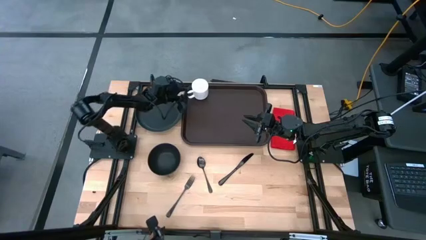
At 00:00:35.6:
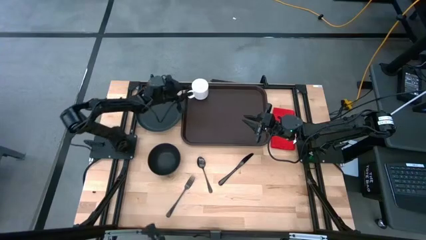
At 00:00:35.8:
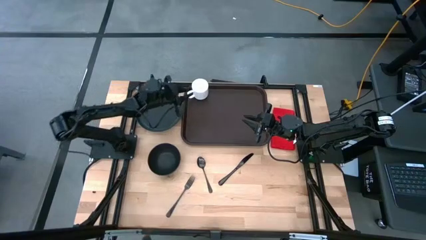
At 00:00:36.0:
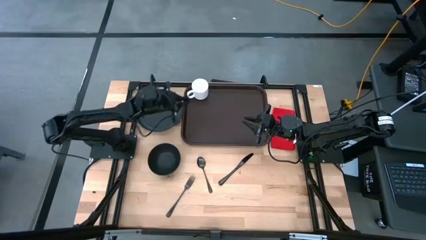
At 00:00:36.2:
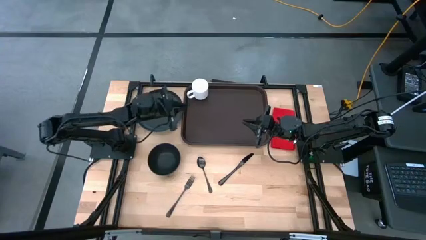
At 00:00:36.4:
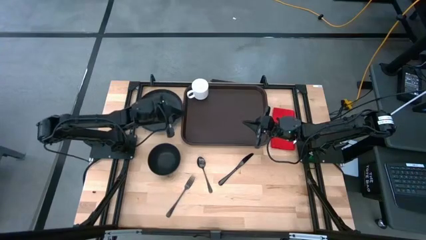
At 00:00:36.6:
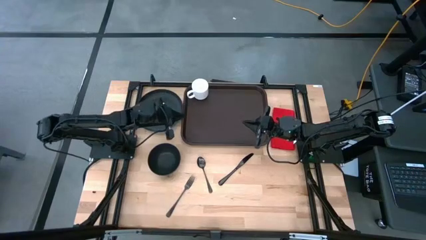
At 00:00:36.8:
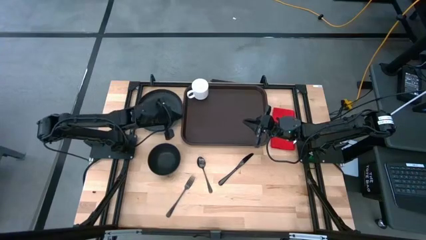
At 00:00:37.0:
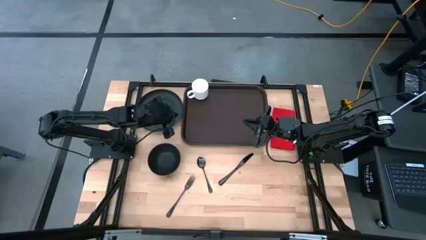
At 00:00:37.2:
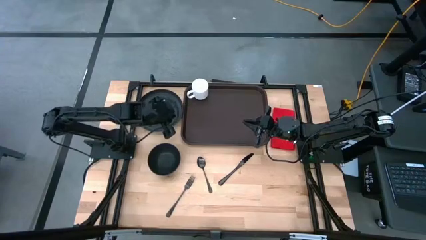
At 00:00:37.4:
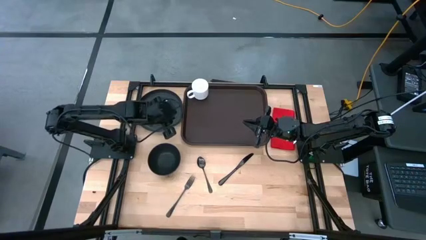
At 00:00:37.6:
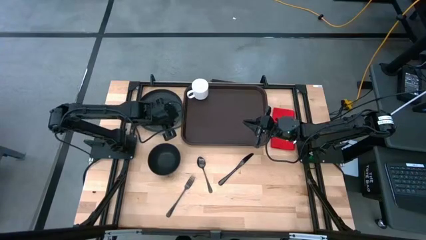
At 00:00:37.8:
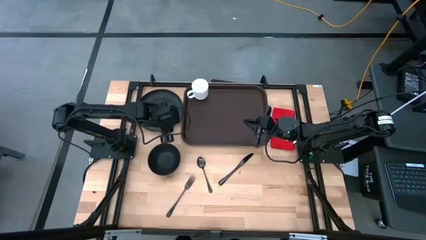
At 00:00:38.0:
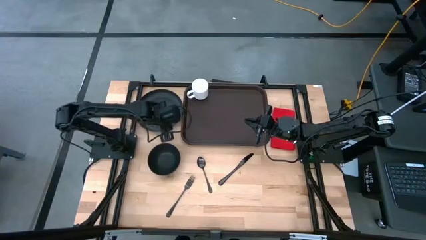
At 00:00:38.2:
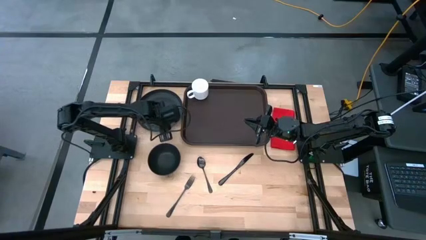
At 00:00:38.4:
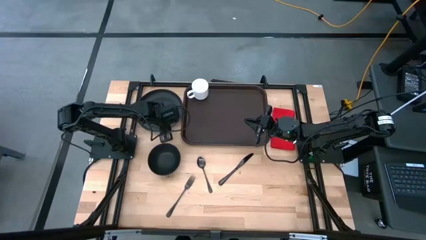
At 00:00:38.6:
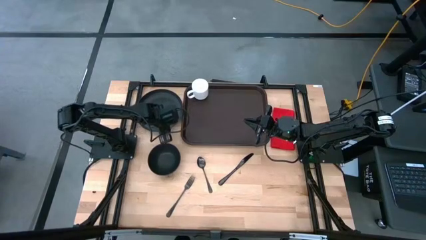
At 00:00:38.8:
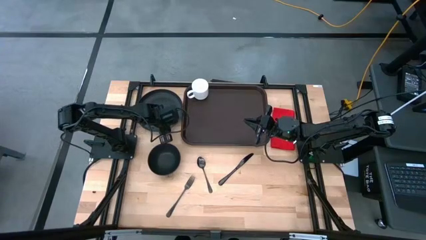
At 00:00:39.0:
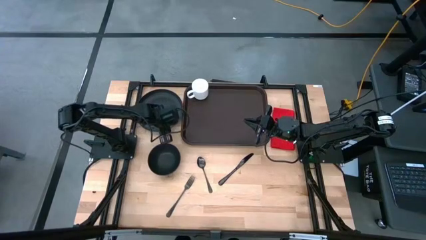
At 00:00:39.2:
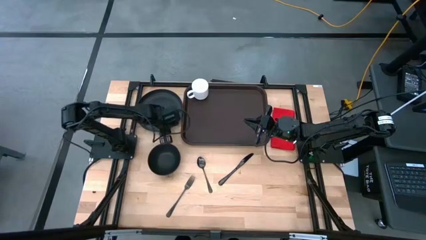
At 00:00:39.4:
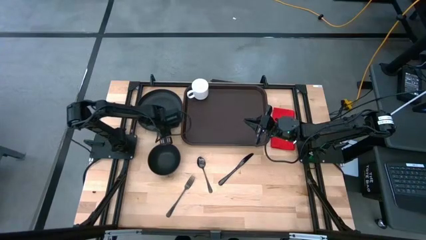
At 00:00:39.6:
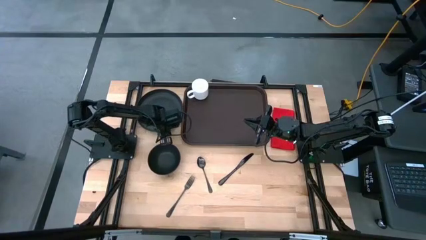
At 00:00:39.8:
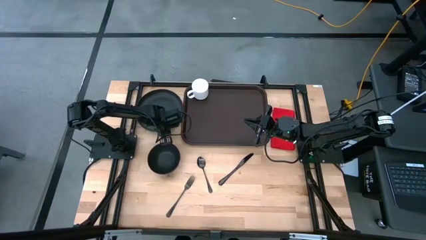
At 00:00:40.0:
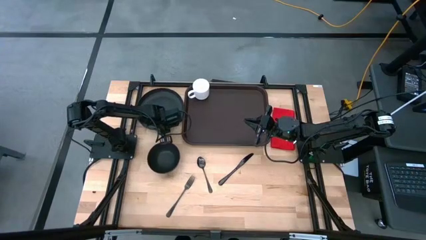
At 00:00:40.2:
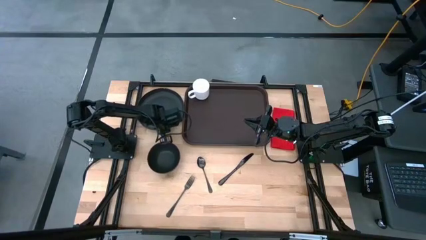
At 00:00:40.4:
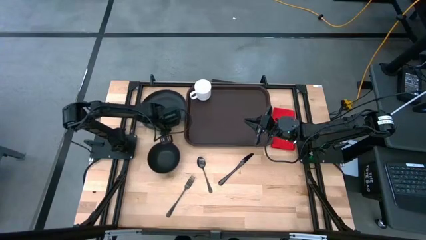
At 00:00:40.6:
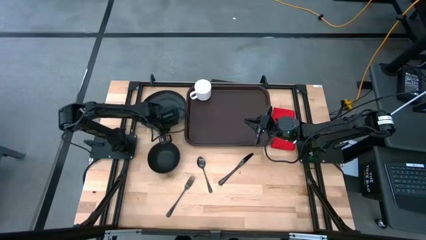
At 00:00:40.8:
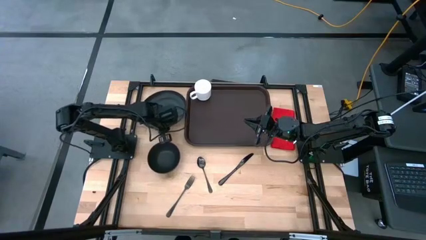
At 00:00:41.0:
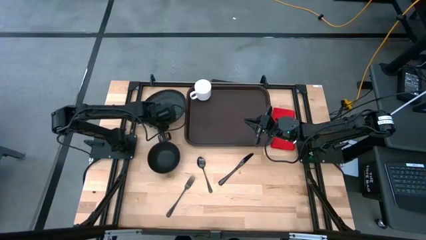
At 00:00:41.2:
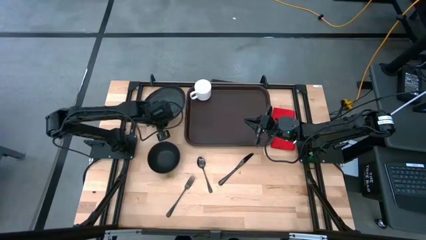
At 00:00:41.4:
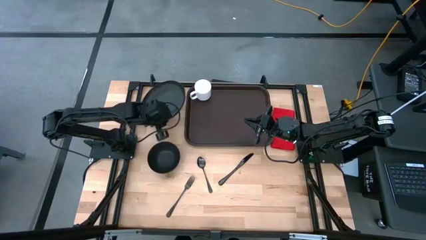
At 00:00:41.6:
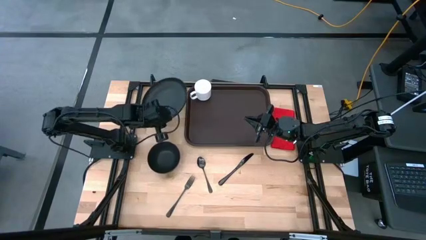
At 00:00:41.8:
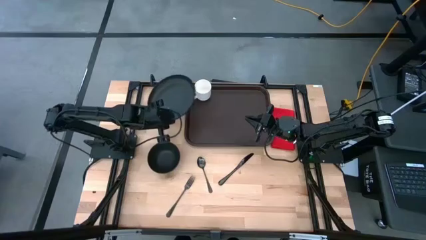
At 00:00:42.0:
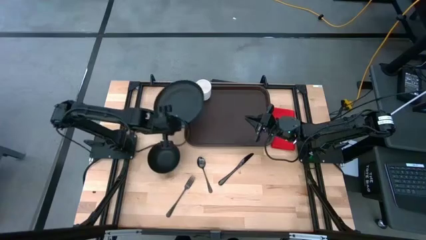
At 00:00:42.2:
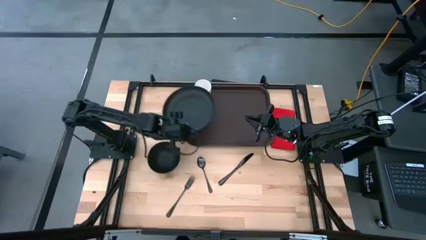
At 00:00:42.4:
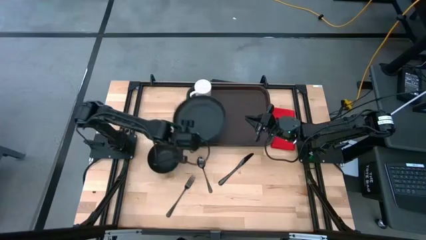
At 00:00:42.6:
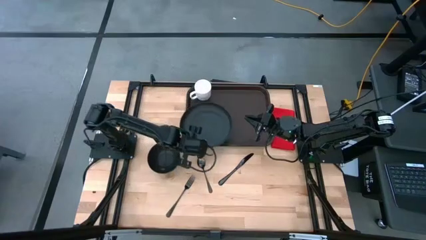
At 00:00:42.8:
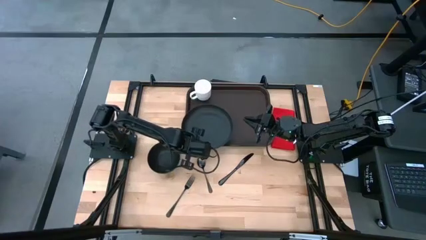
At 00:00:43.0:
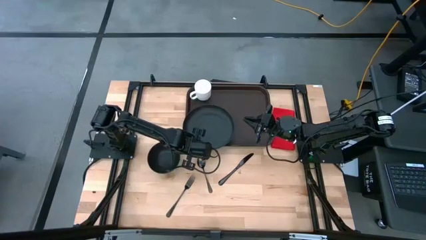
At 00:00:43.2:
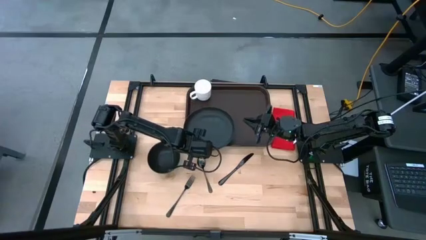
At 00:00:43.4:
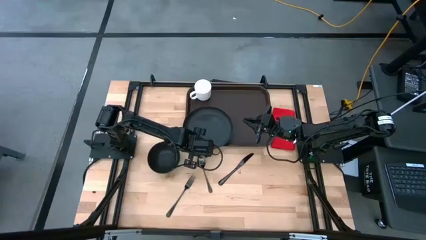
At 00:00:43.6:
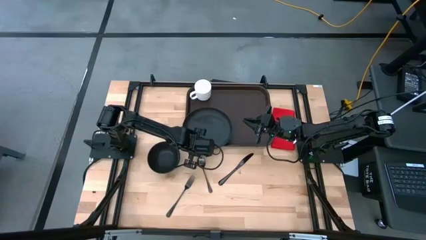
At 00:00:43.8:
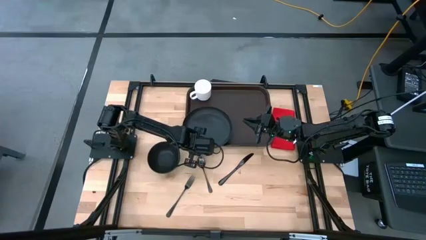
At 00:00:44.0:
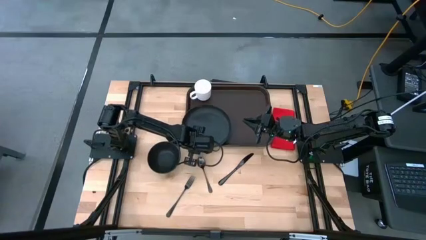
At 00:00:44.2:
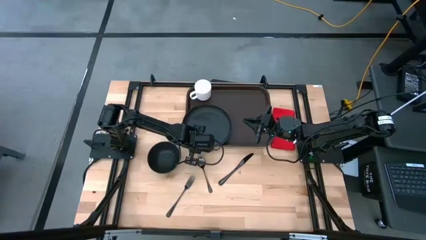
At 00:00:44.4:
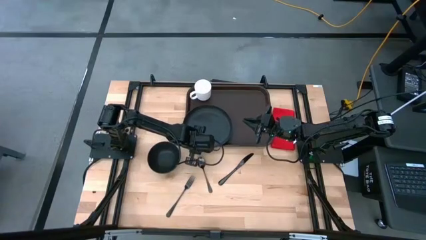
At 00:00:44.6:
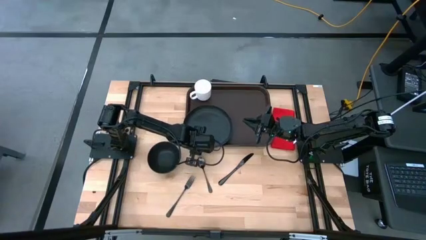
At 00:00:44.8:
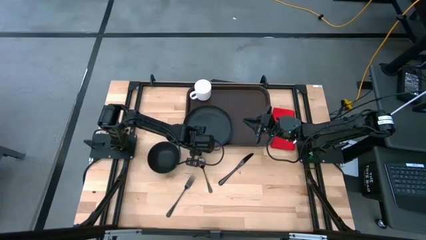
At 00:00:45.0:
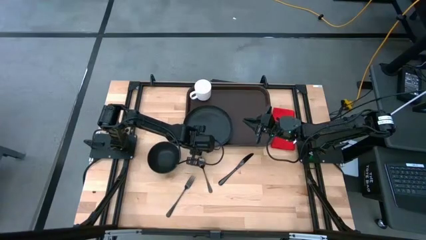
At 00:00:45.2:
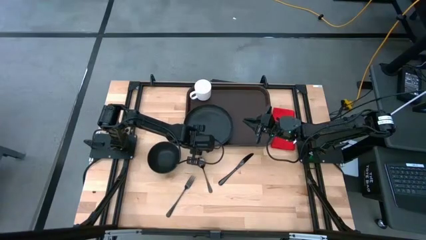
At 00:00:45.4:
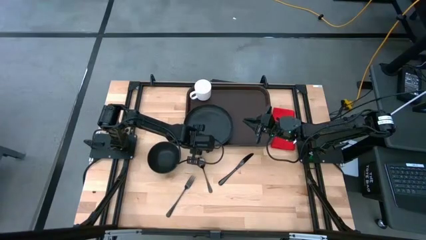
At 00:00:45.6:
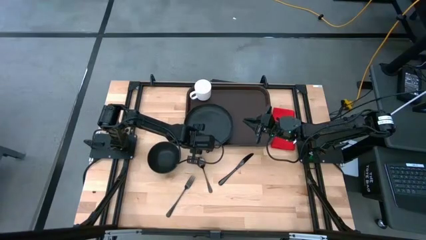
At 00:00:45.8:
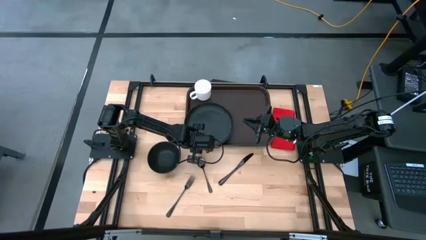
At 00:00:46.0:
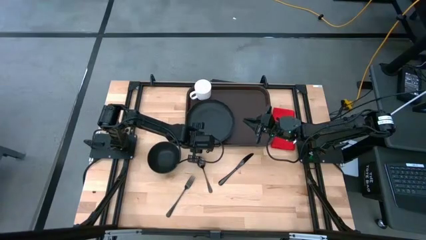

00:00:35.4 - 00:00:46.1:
Task: Set up tray
Put the black plate on the brown tray below the white mug

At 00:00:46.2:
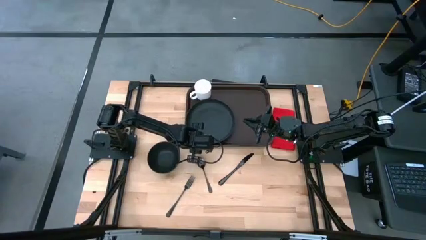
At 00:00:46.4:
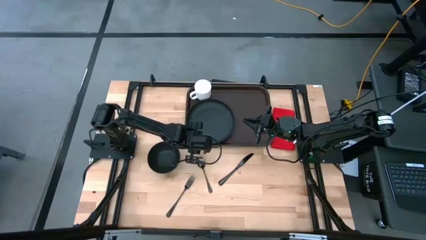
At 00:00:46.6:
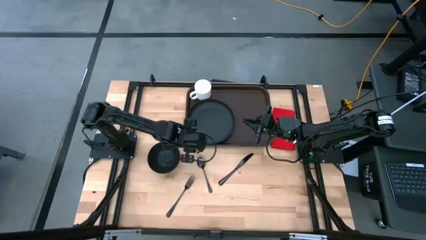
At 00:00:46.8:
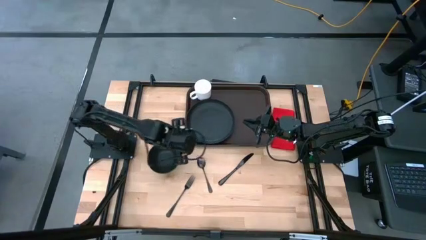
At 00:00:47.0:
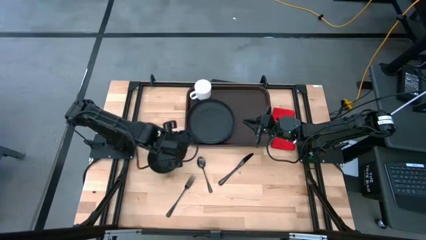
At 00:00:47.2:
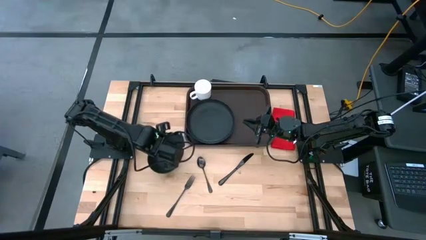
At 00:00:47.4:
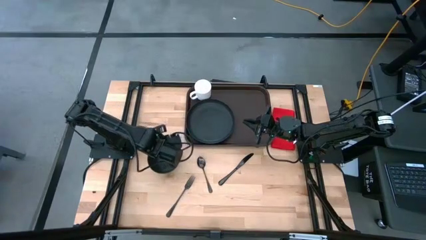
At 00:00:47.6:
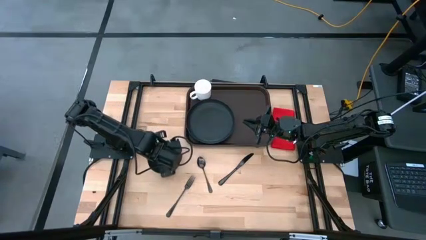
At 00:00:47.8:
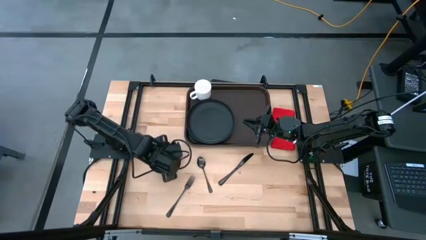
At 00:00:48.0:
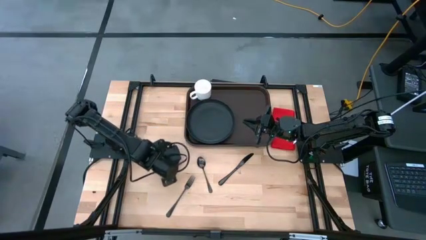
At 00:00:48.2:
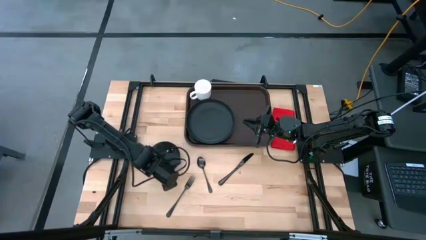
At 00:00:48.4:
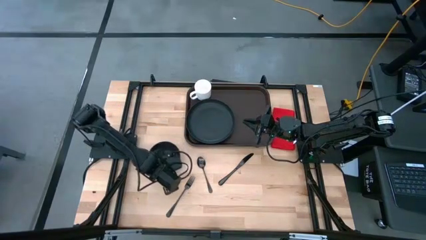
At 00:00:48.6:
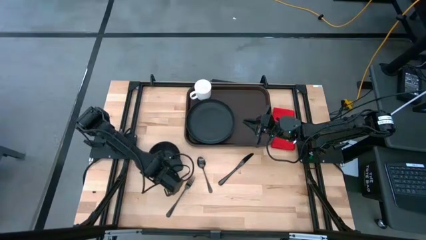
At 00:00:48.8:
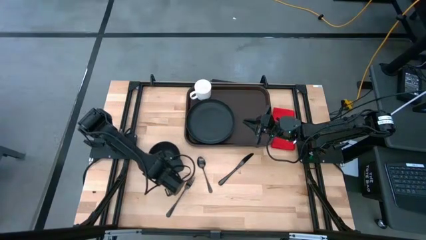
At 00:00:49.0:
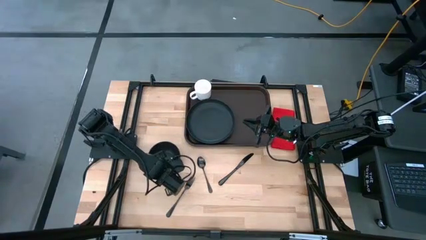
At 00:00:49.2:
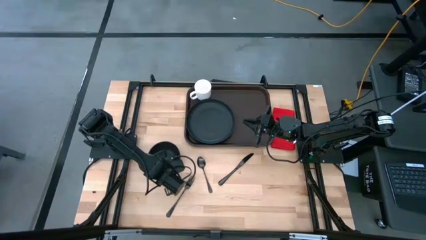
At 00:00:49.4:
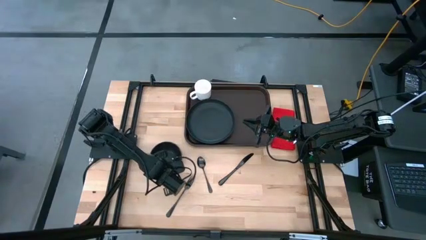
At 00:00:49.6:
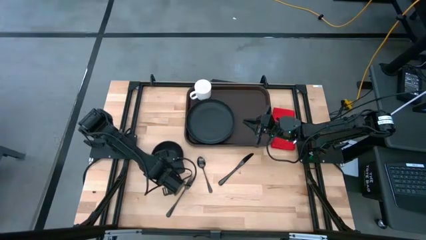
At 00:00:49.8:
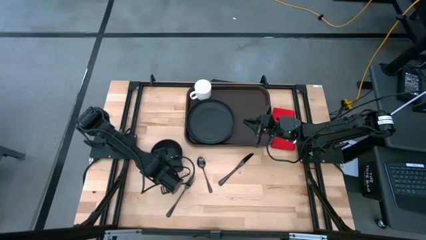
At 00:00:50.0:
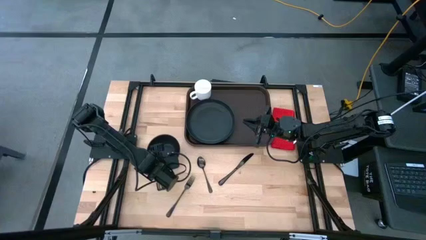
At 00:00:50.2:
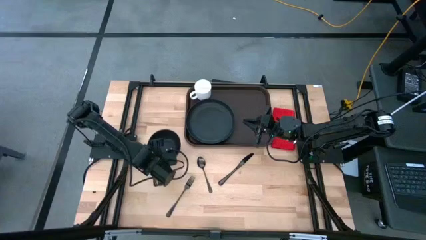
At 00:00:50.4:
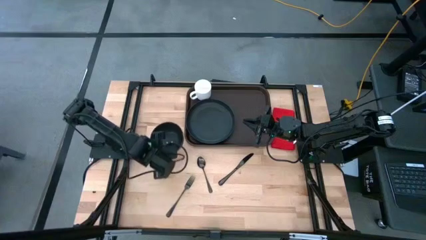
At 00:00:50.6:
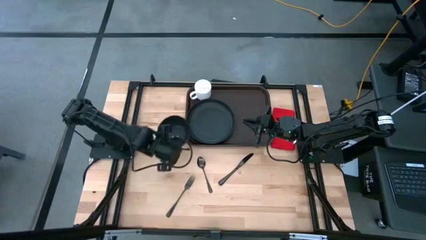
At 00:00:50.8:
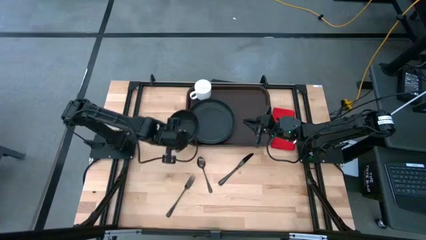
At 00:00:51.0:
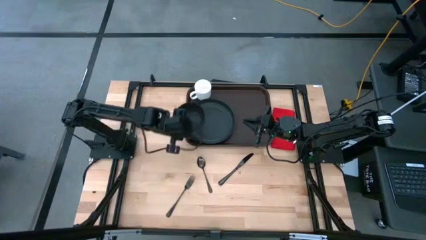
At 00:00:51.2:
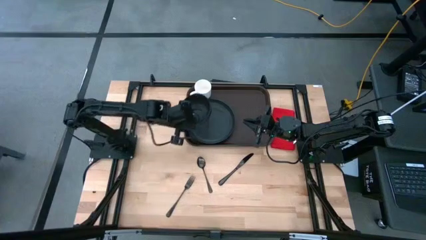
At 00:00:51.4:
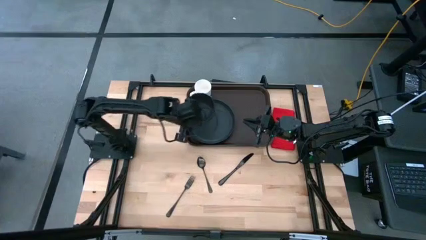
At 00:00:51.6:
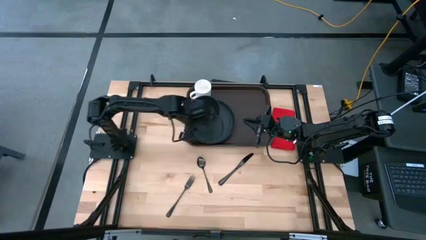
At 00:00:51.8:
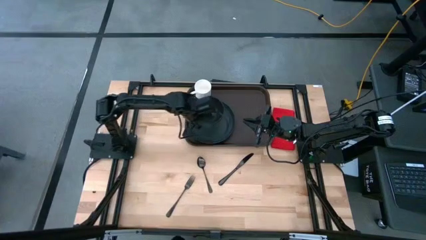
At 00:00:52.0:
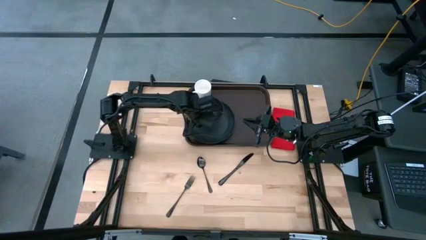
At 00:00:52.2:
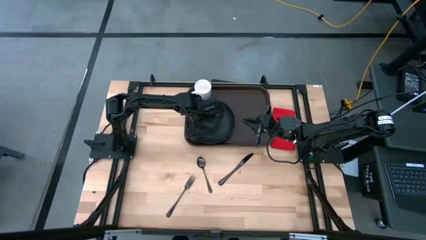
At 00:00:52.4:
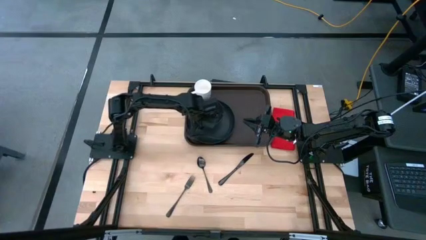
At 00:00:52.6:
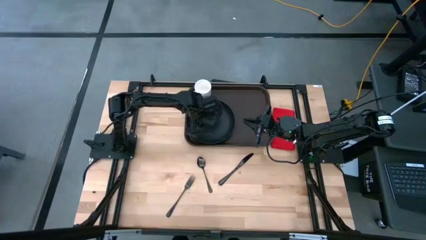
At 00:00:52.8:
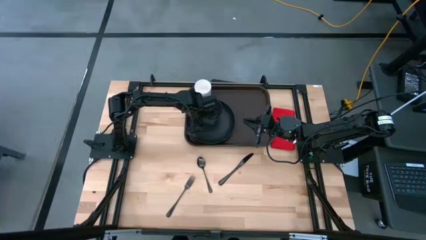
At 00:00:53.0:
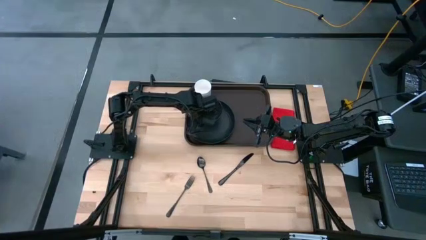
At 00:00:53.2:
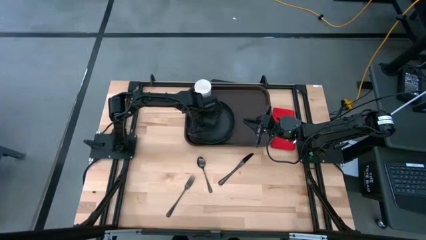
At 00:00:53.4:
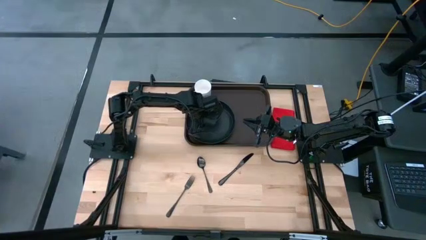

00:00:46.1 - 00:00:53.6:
Put the black bowl on the black plate
